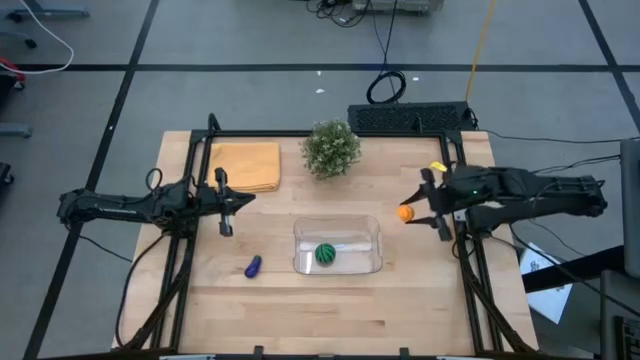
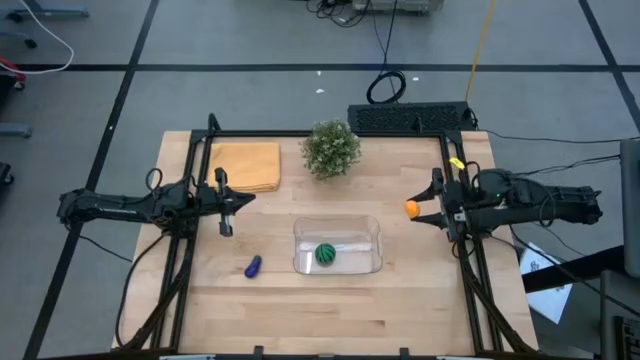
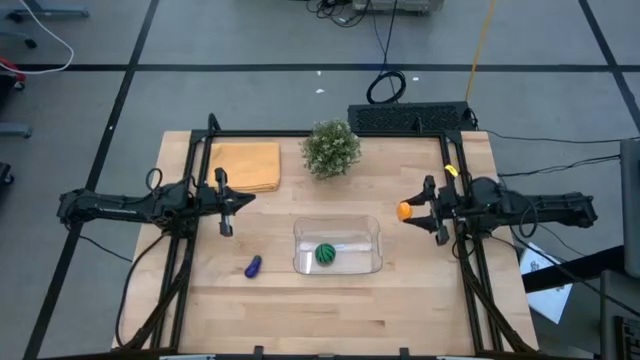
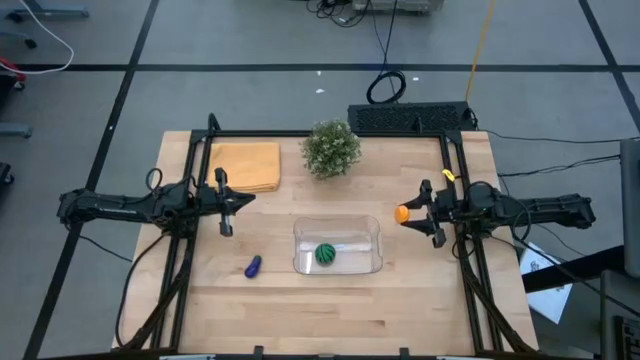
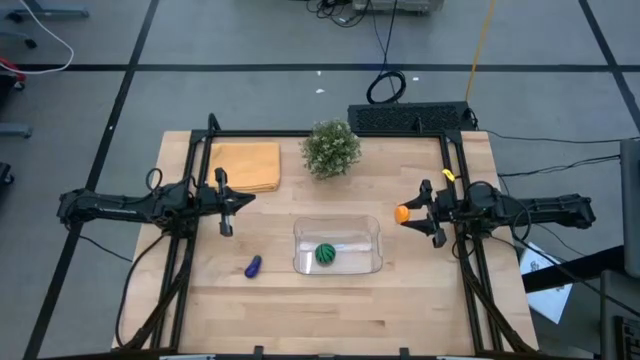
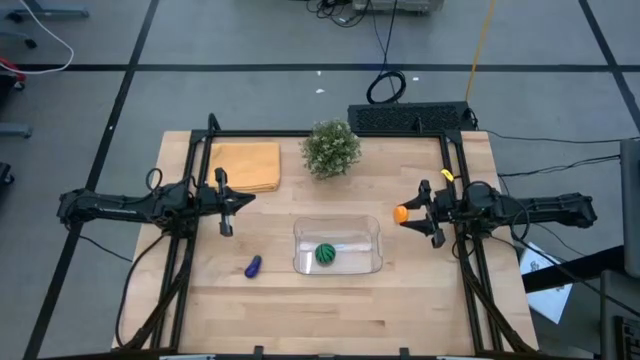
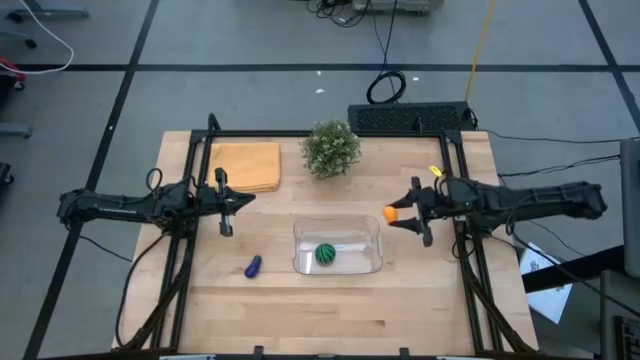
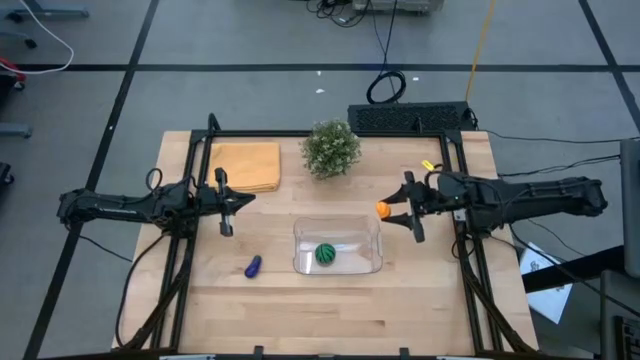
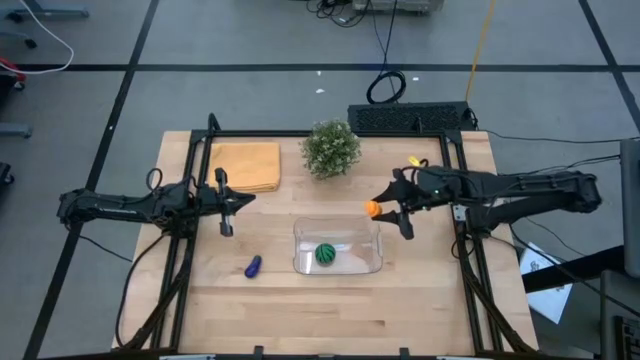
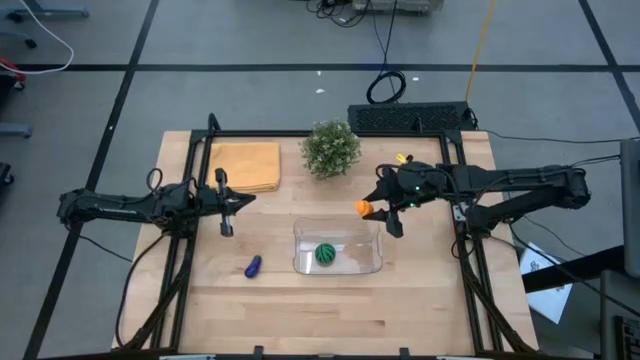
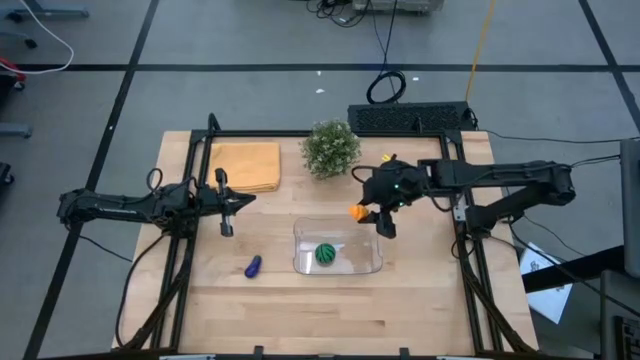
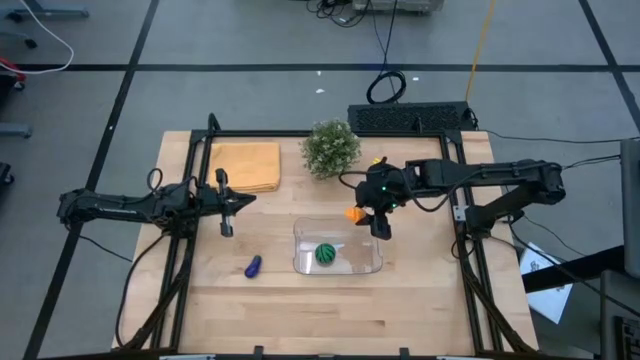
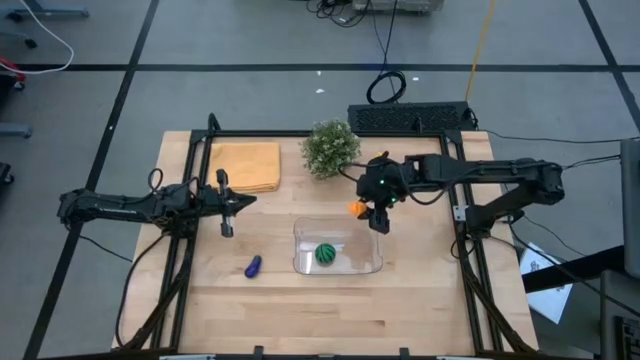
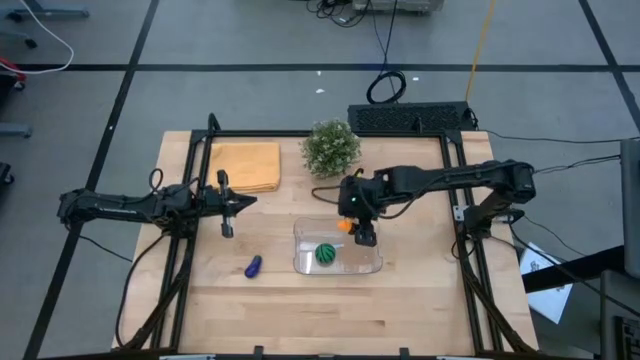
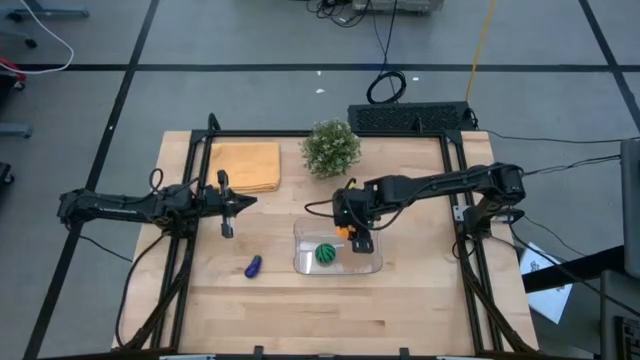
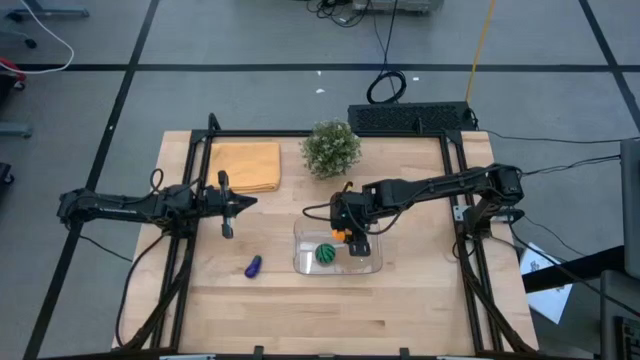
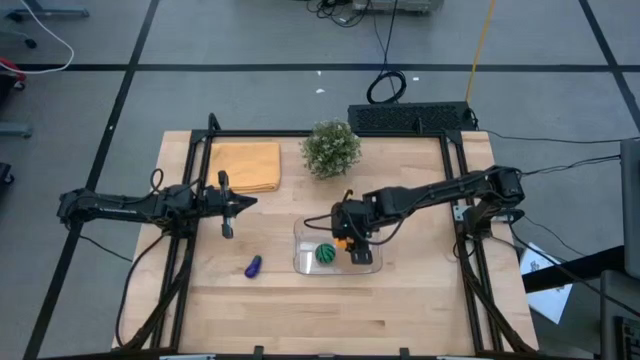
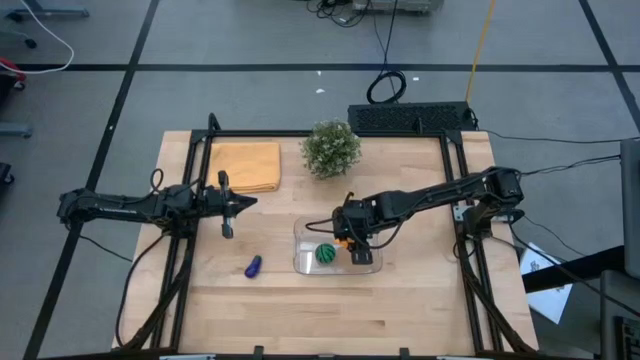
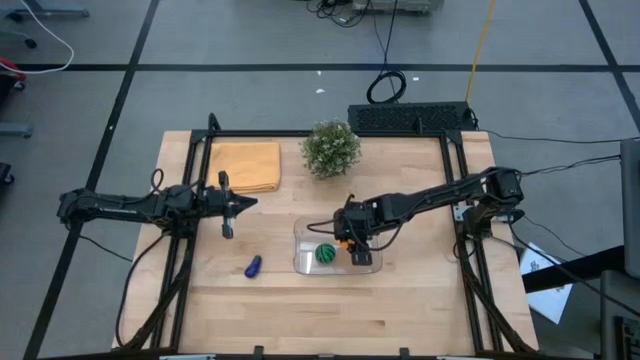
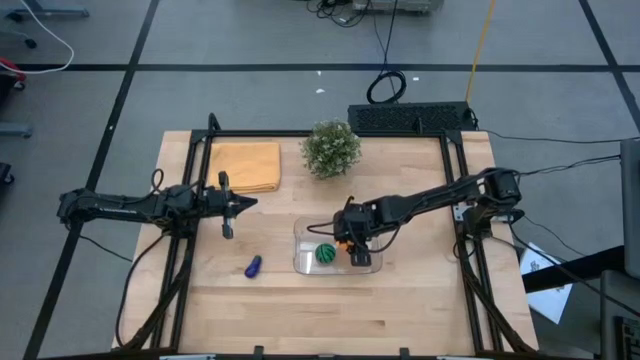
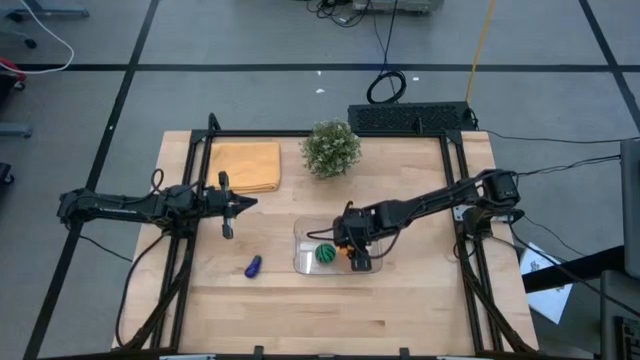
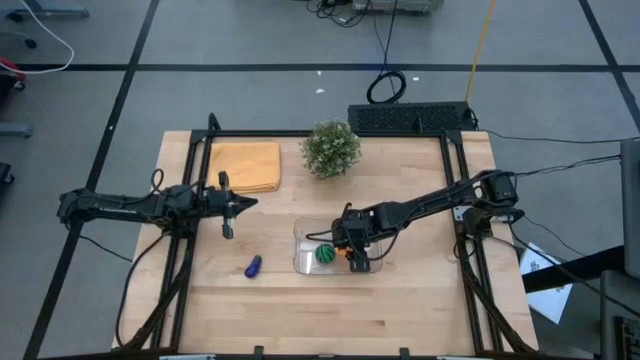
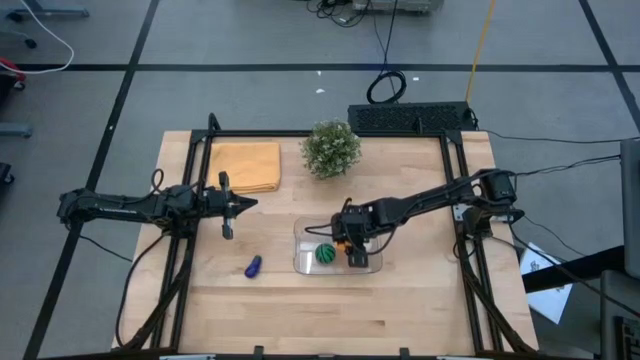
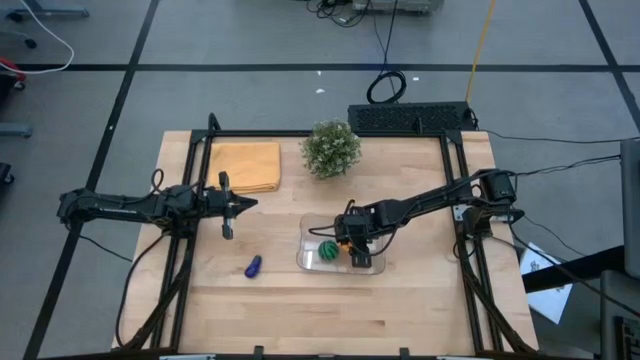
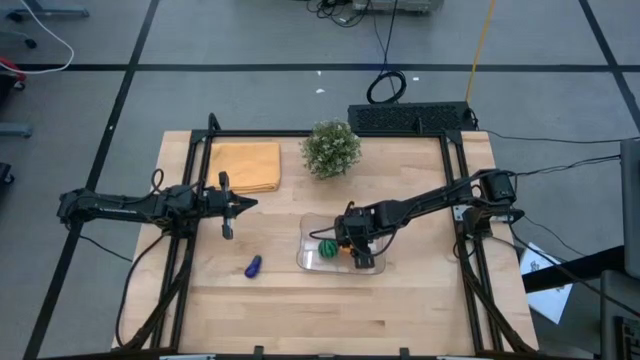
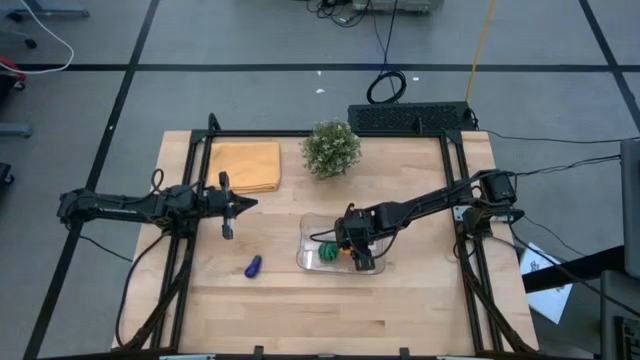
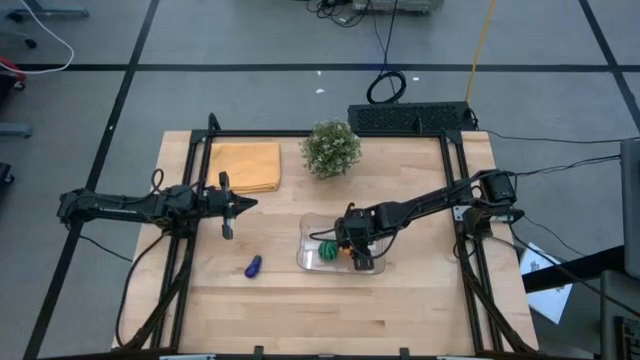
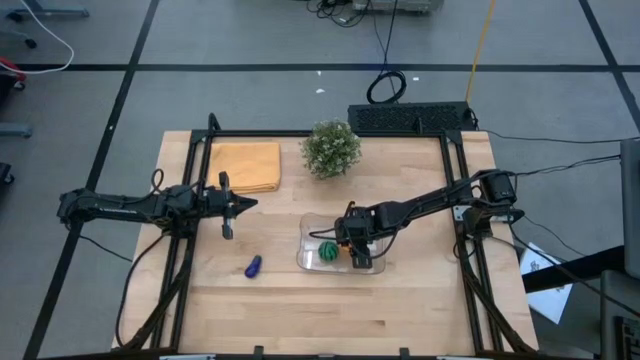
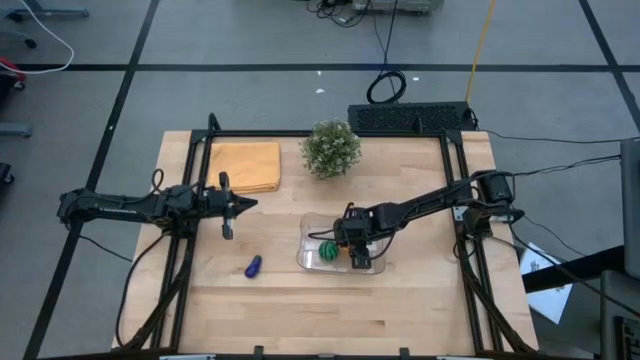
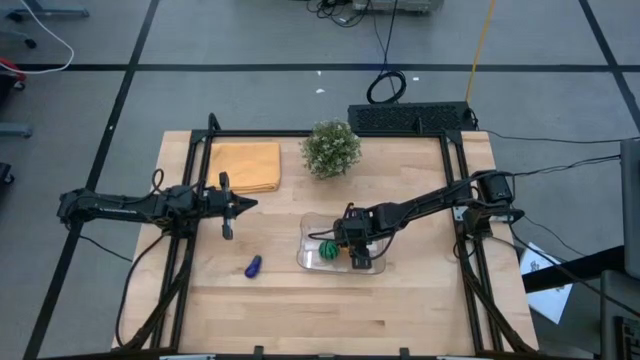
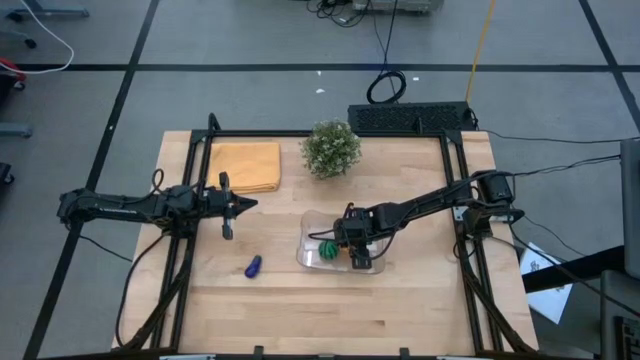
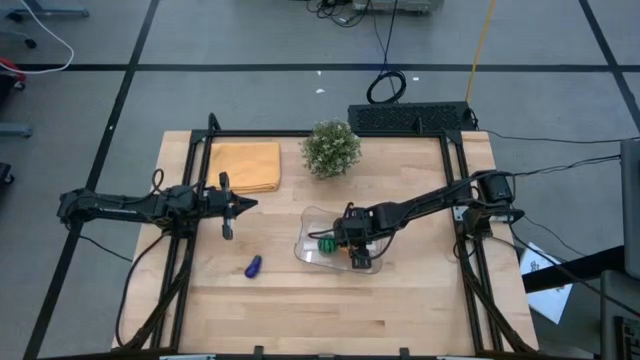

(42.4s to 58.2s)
Task: Pick and placing Produce into tupperware
Put the pumpkin into the transparent bin

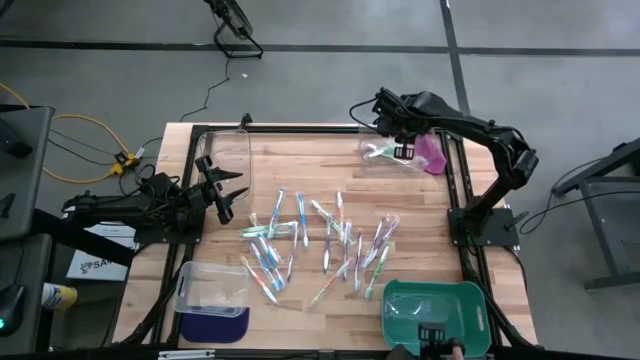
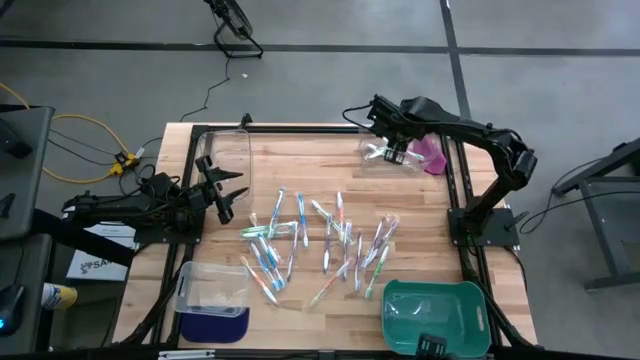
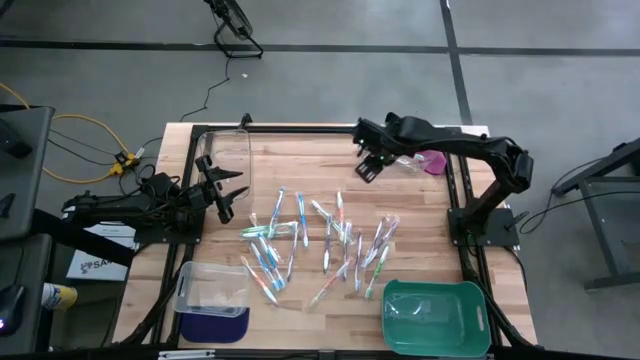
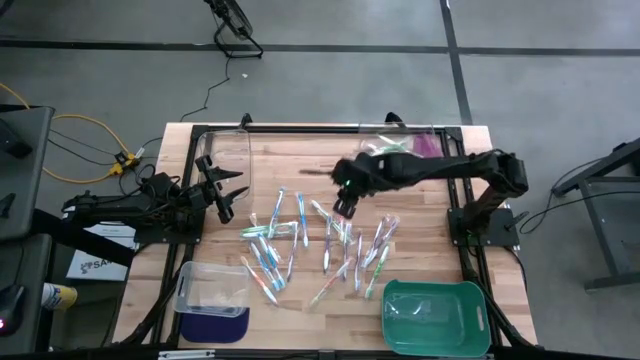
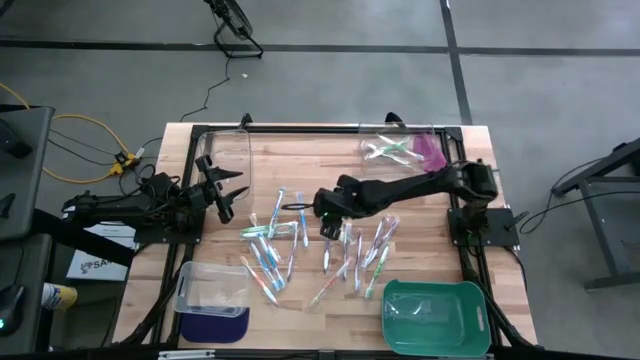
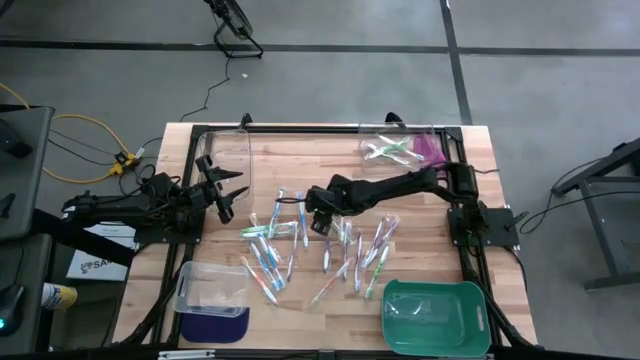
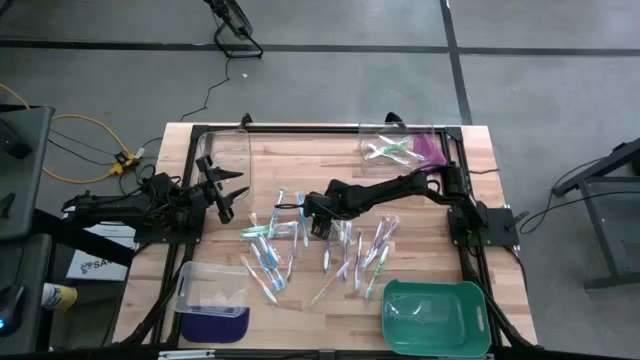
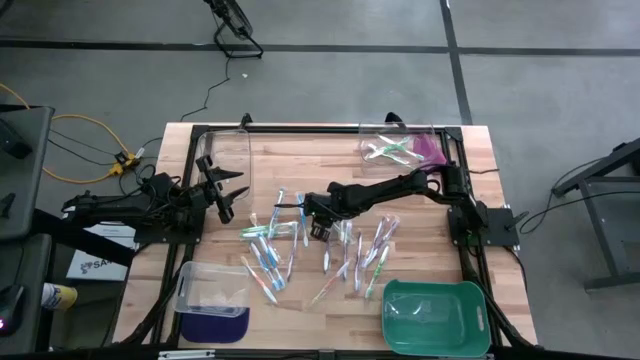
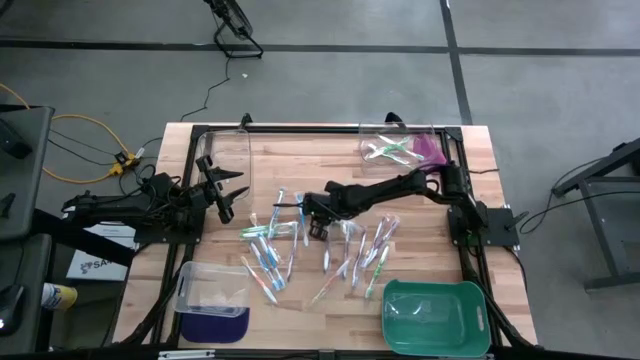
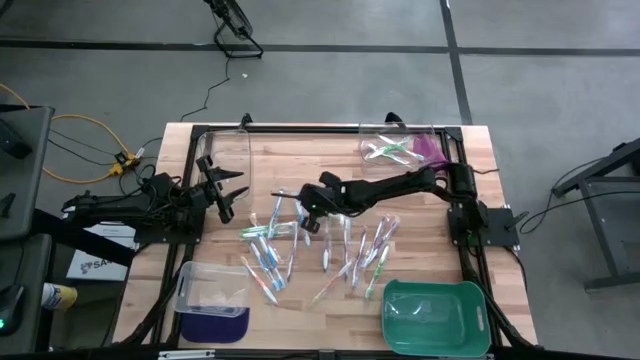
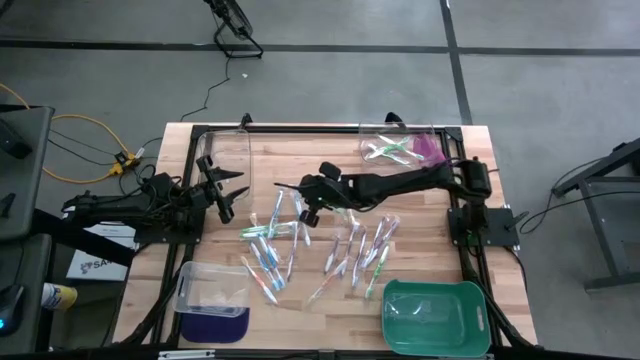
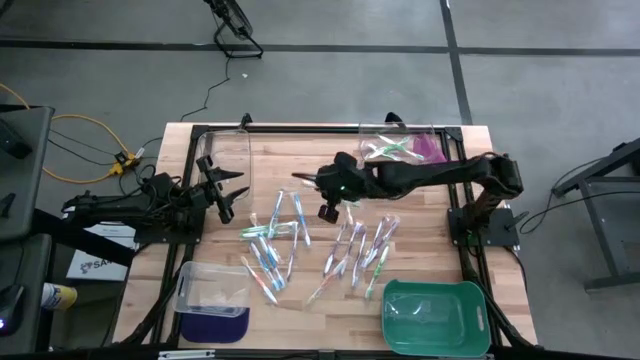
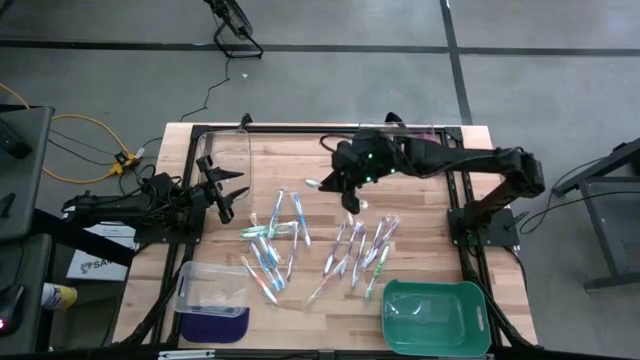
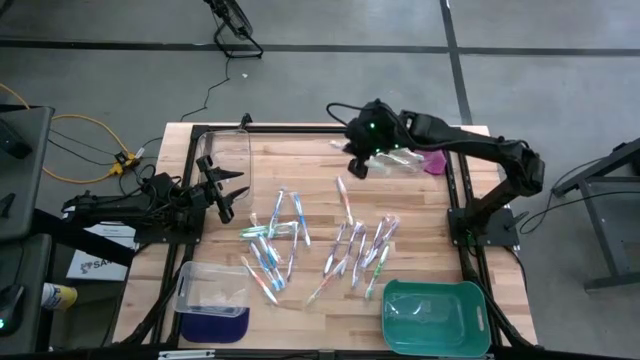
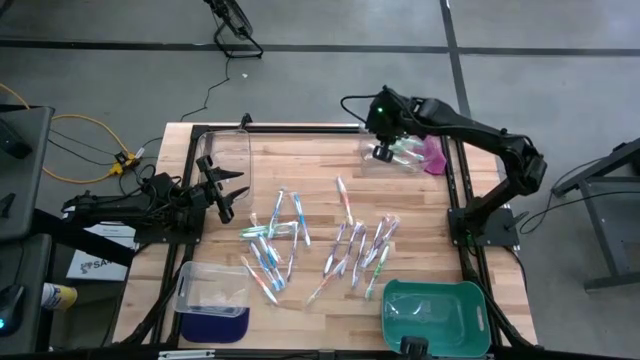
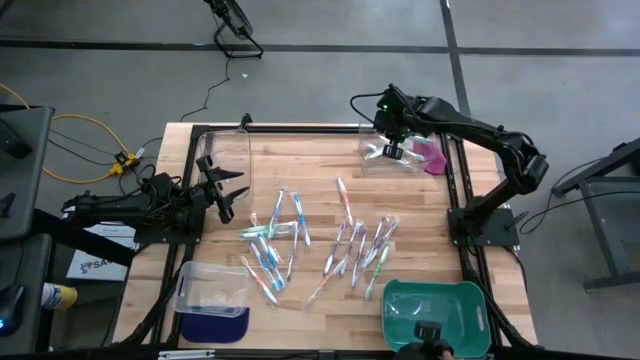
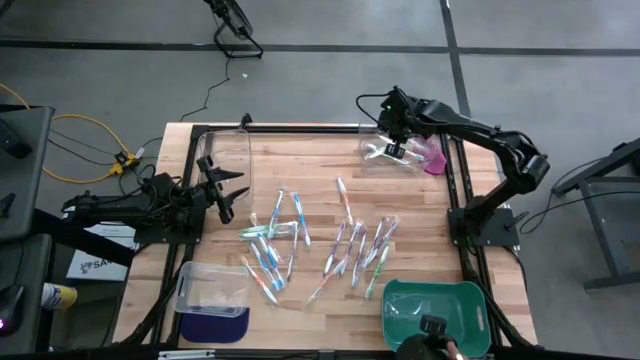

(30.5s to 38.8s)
Task: Pick & Place Toothbrushes
Put the green toothbrush into the top right transparent bin
